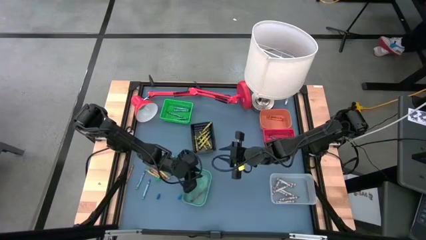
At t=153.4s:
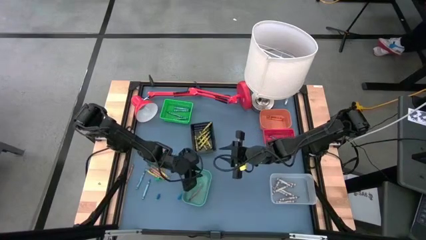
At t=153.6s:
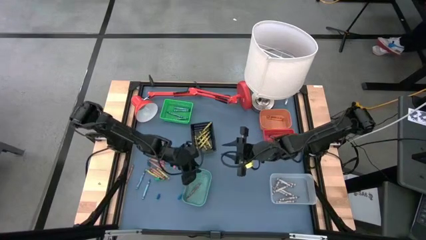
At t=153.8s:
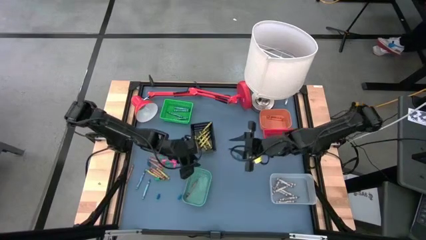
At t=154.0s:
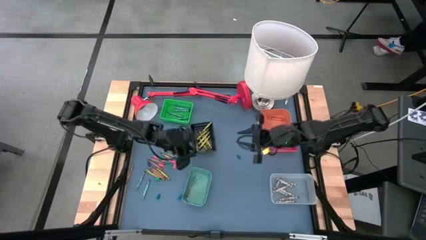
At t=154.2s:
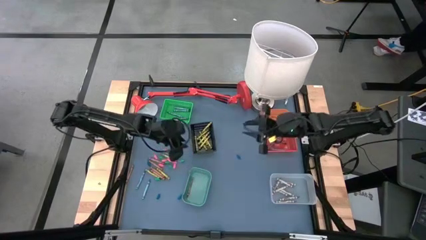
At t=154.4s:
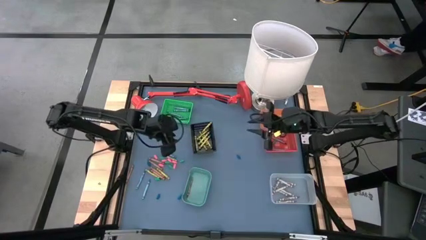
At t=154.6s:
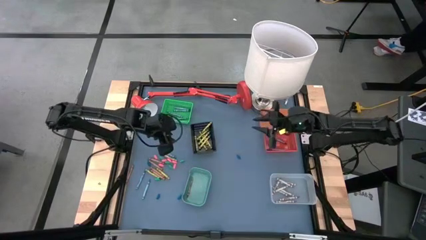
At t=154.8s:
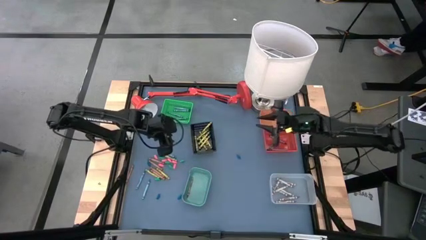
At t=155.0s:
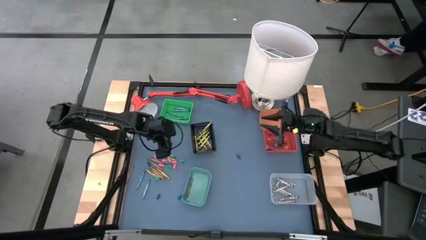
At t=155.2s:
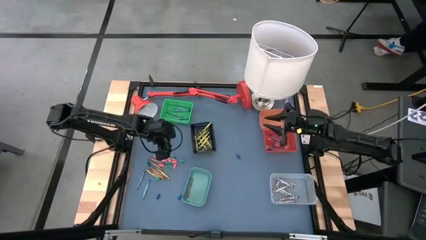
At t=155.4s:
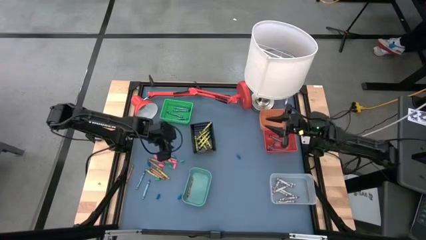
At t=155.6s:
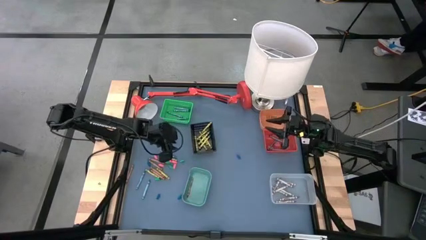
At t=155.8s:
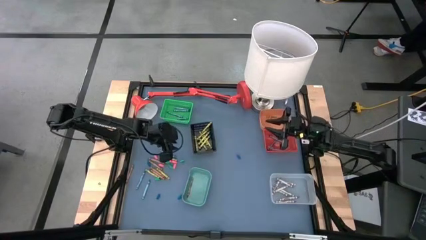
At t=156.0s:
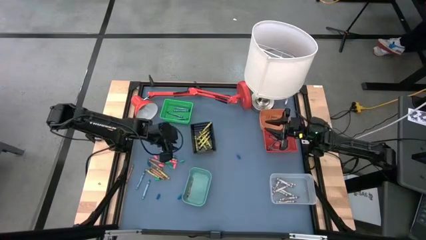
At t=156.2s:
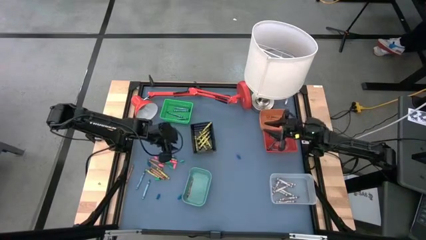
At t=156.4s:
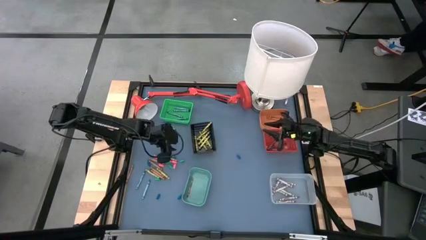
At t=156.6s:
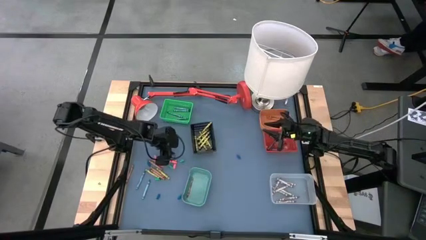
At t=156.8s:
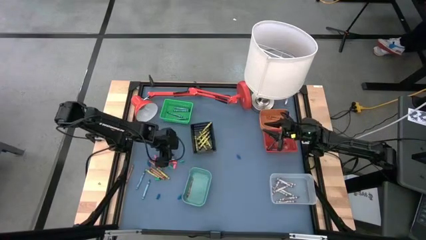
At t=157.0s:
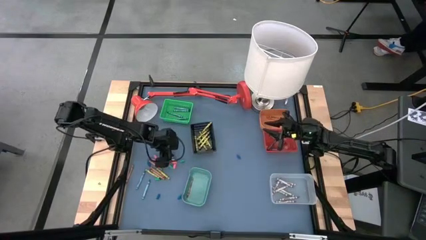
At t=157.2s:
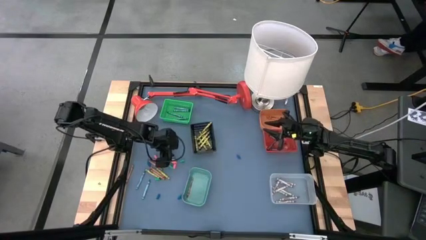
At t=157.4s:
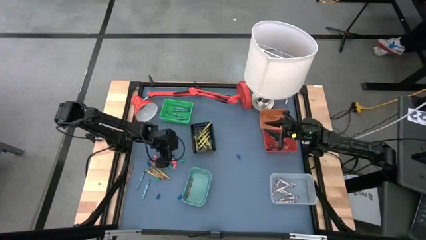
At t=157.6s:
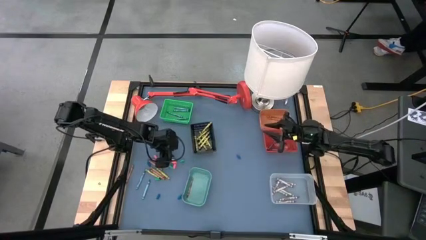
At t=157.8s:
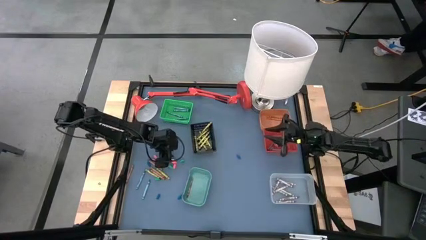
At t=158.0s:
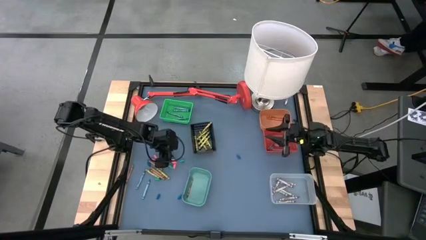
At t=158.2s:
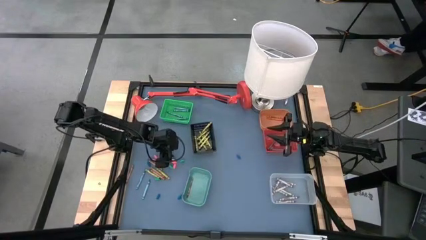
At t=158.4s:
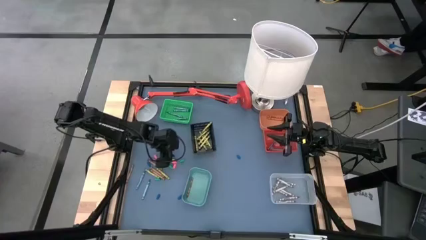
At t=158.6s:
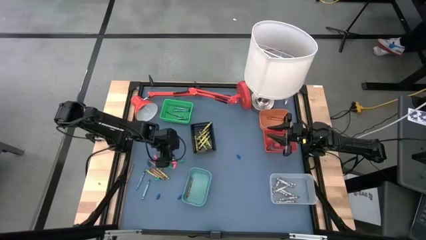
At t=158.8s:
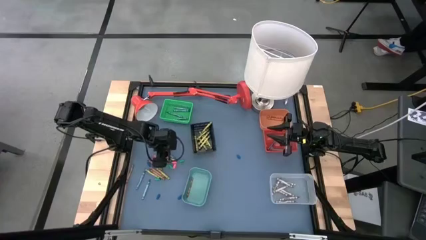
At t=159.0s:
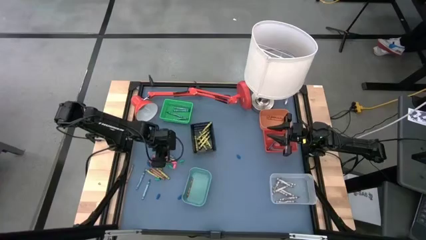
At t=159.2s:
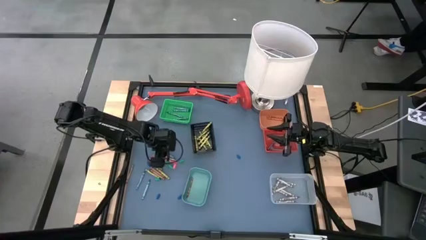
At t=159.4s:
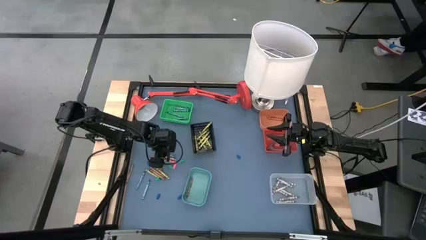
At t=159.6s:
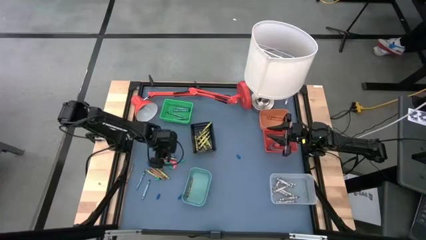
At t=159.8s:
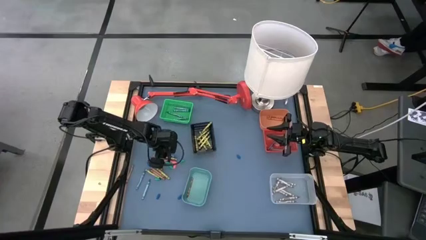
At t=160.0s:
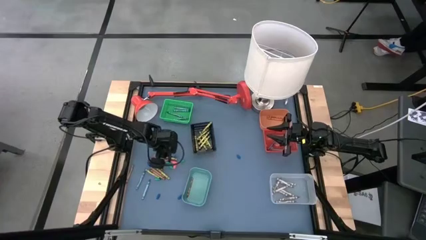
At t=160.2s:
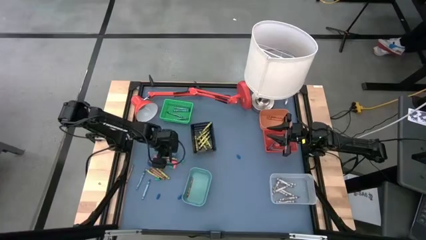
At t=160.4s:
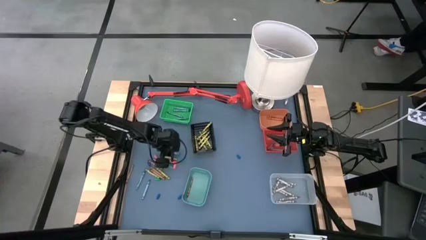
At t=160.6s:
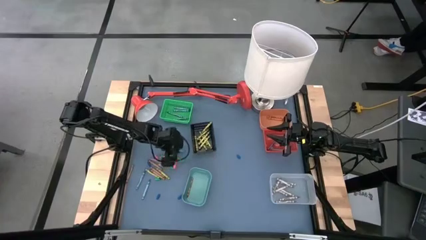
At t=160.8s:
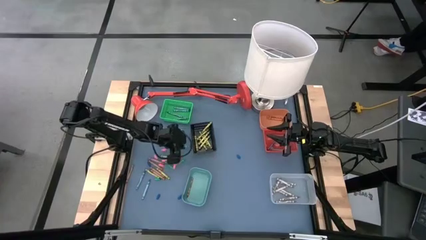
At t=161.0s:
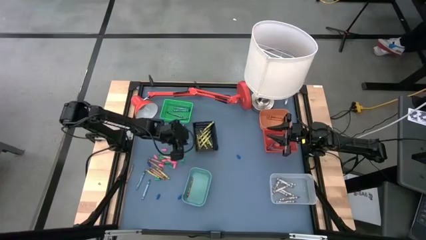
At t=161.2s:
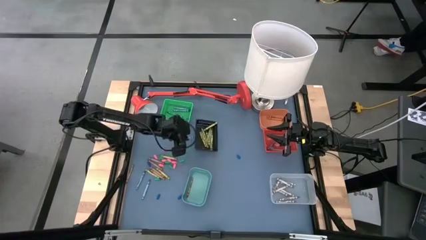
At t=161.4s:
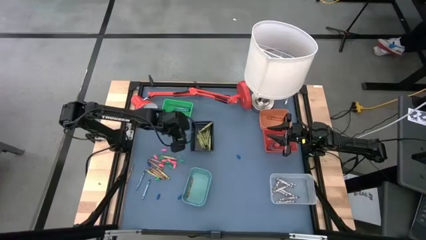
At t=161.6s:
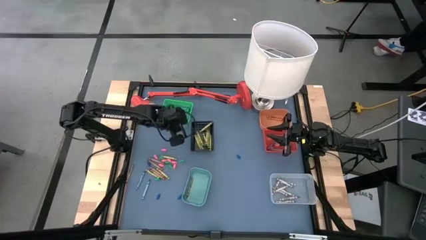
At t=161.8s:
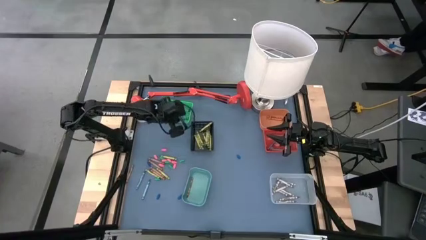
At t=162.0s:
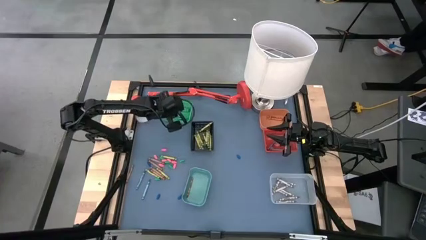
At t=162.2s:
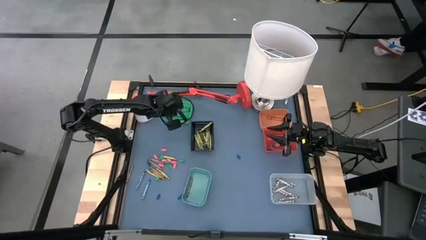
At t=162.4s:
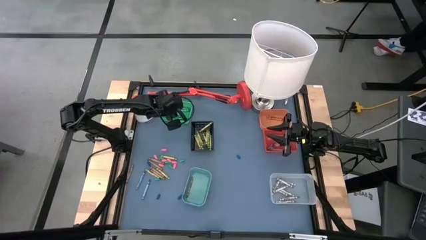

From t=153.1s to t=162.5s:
Task: Sort crayons
Put the blue green crayon into the green bin

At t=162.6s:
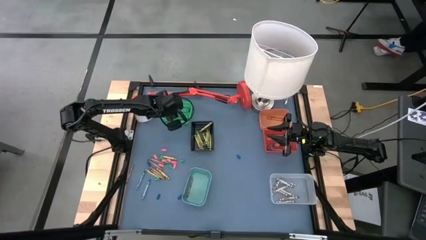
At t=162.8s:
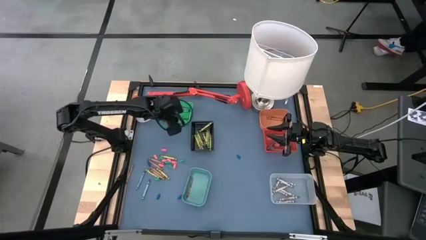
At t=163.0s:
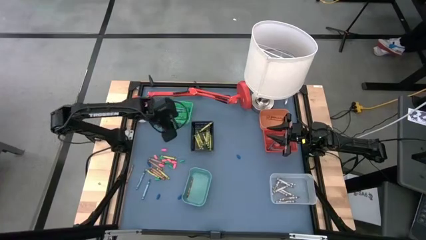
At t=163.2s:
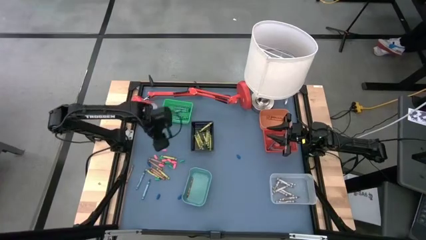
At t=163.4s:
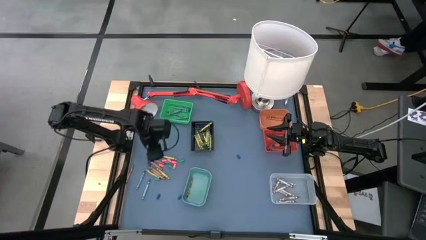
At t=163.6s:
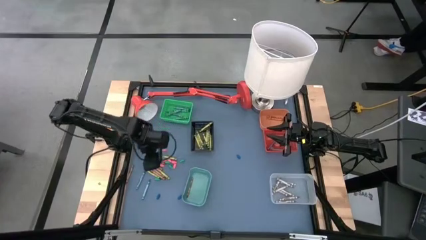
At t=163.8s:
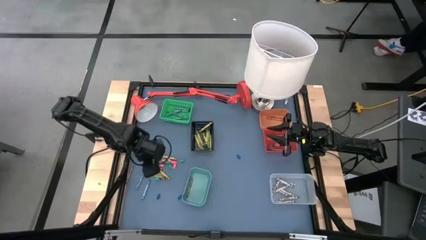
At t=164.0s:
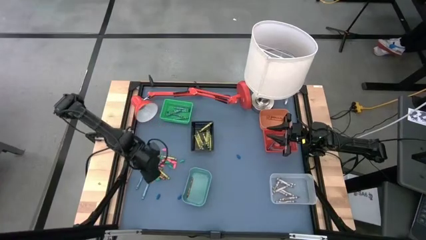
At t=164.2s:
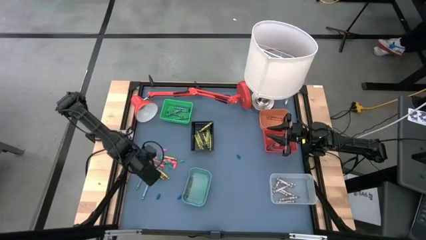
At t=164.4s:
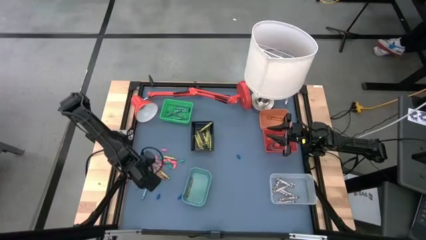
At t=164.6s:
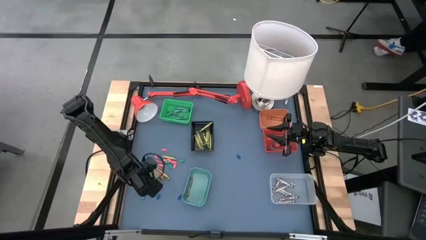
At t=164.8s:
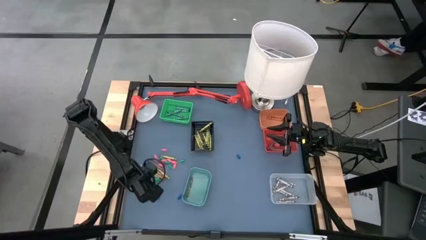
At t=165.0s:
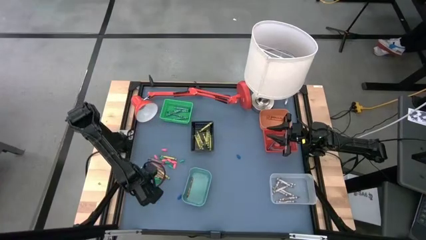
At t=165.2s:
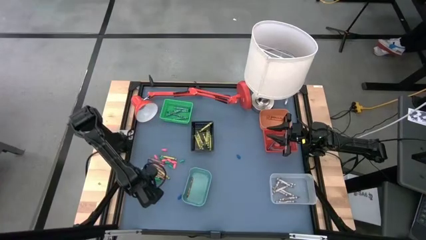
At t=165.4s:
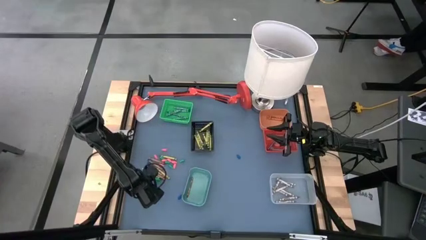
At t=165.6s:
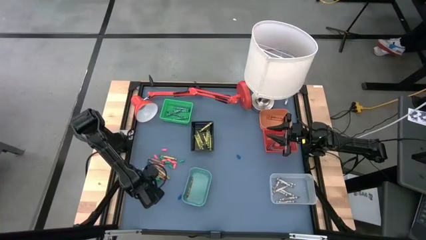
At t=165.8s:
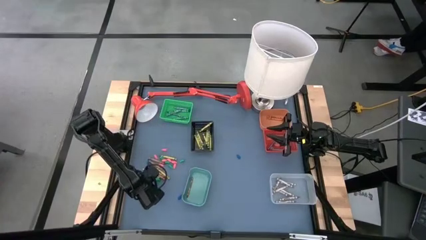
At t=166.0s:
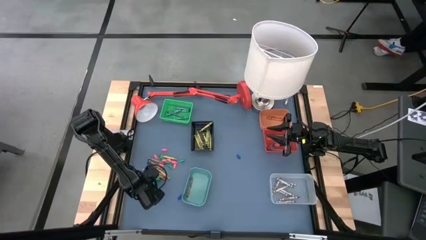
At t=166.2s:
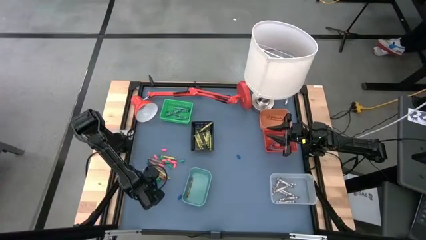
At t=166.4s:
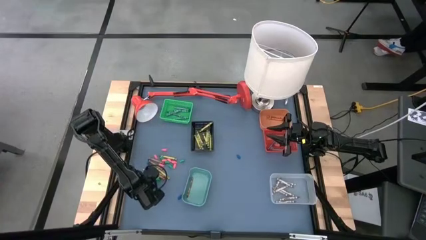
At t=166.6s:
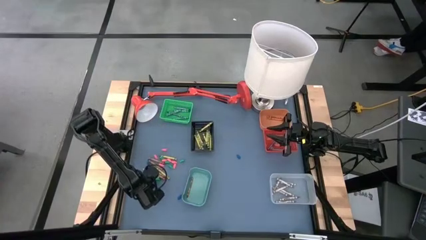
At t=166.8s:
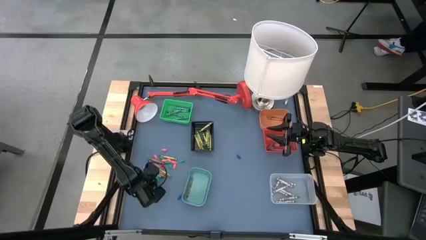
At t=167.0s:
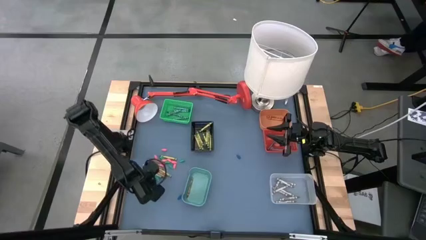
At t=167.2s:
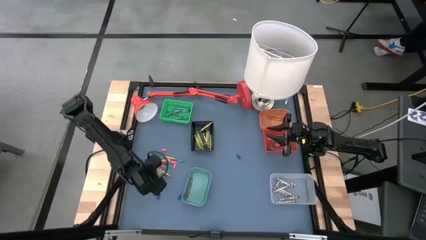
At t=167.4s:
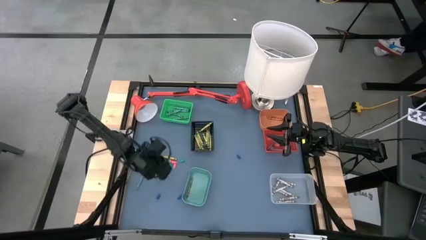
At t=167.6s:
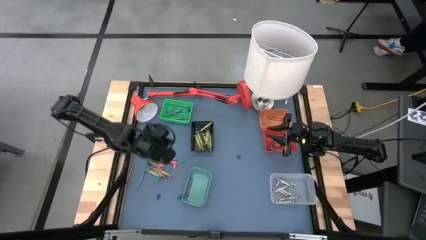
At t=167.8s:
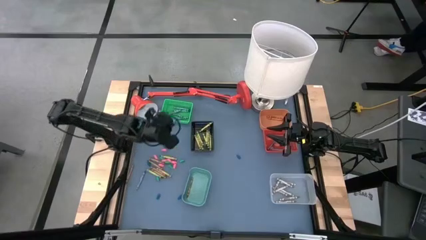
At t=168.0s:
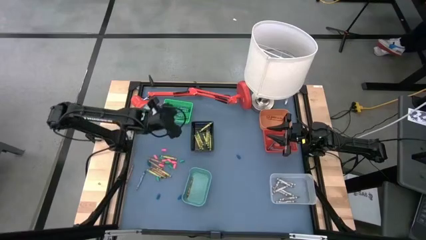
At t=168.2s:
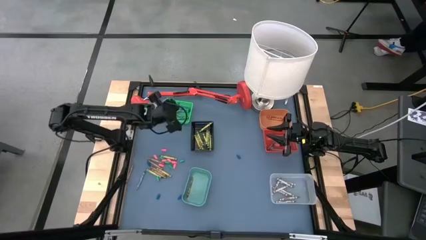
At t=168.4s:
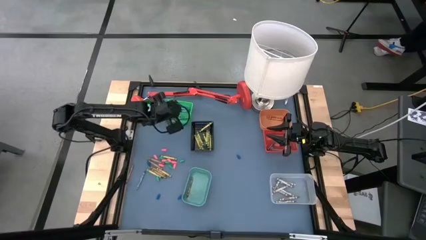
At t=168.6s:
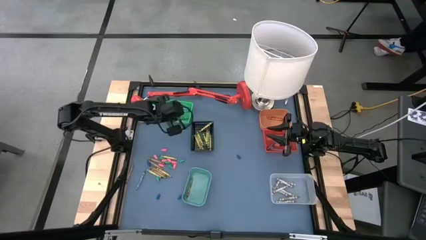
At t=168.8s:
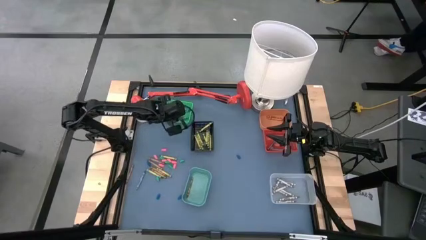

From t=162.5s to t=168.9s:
Put the blue green crayon into the green bin
